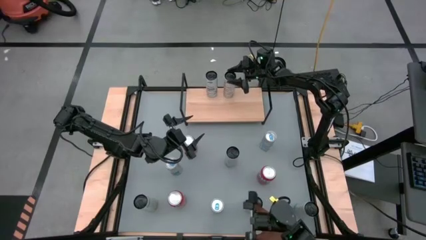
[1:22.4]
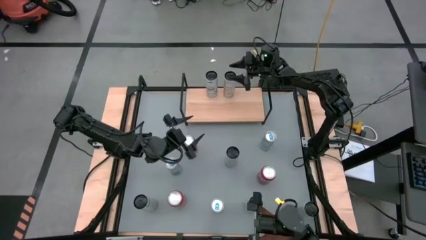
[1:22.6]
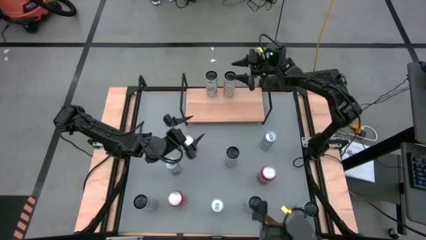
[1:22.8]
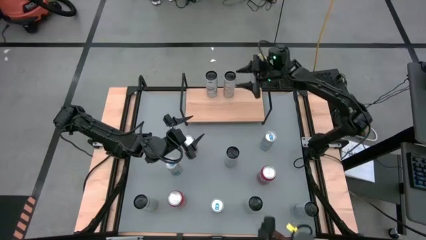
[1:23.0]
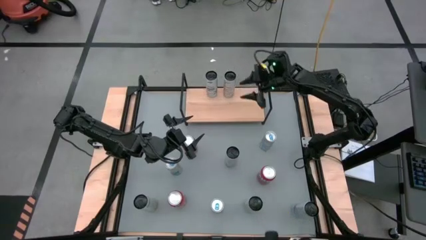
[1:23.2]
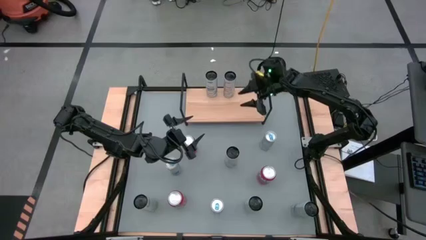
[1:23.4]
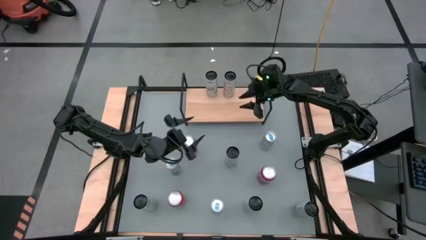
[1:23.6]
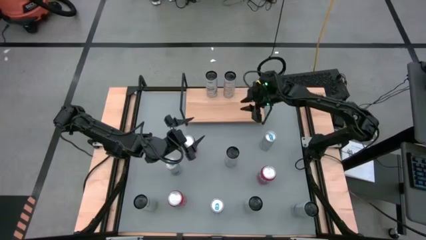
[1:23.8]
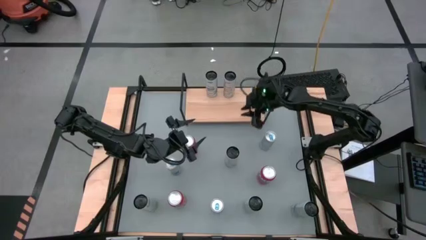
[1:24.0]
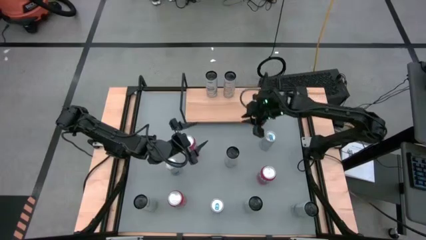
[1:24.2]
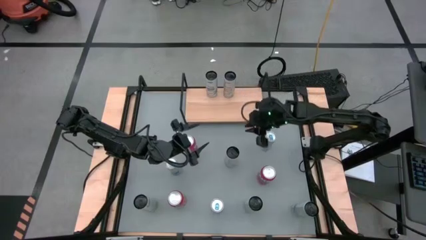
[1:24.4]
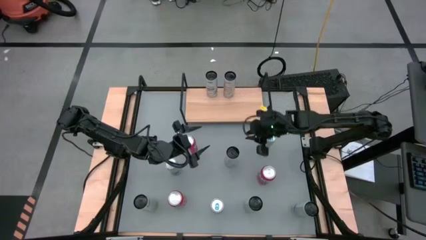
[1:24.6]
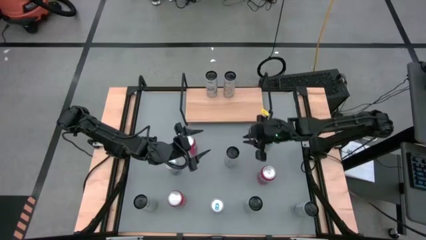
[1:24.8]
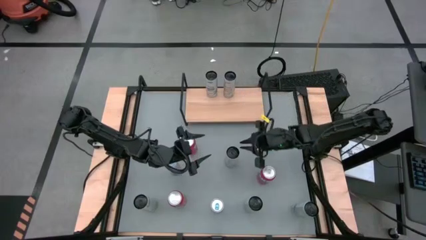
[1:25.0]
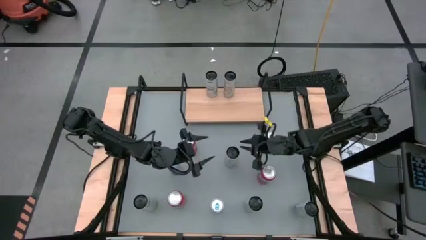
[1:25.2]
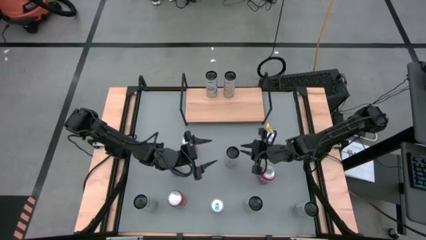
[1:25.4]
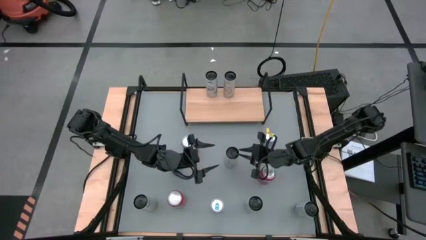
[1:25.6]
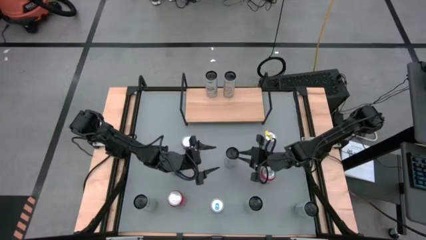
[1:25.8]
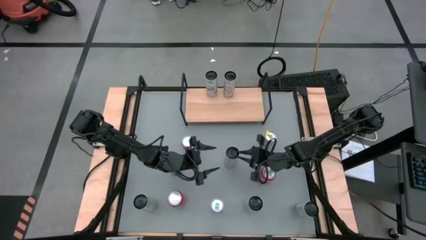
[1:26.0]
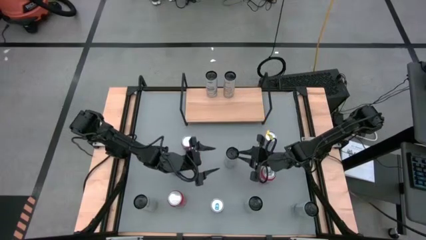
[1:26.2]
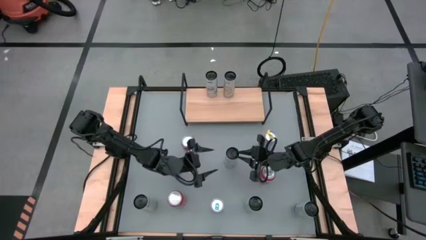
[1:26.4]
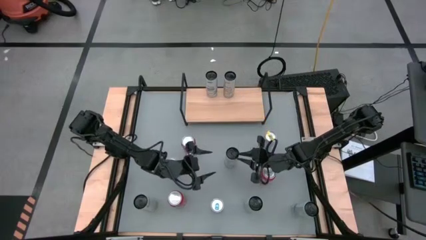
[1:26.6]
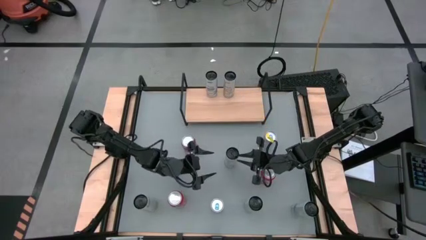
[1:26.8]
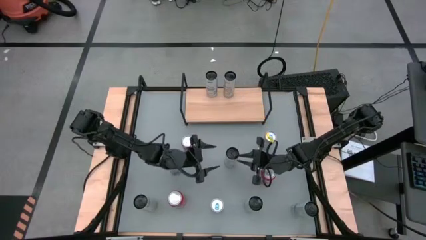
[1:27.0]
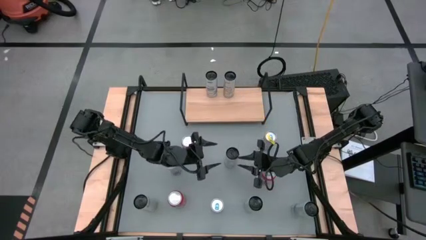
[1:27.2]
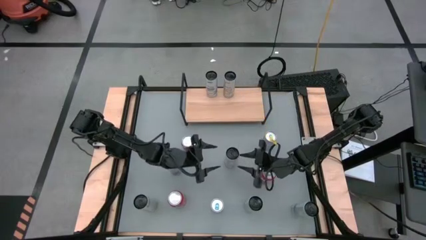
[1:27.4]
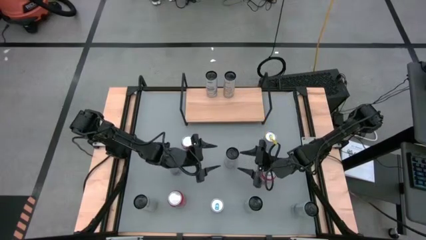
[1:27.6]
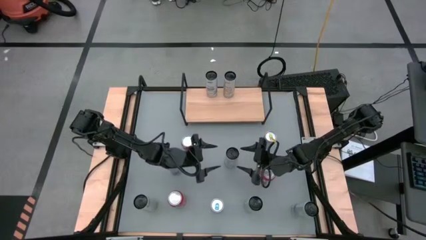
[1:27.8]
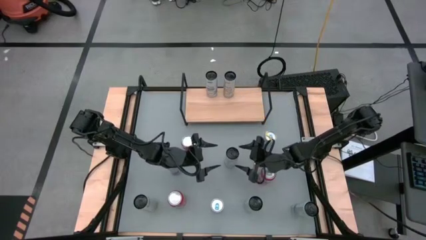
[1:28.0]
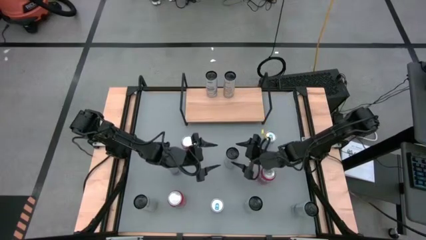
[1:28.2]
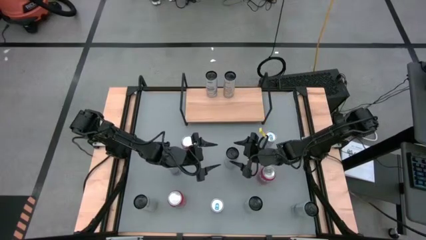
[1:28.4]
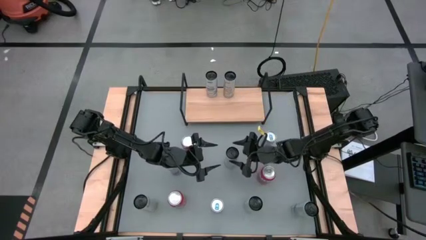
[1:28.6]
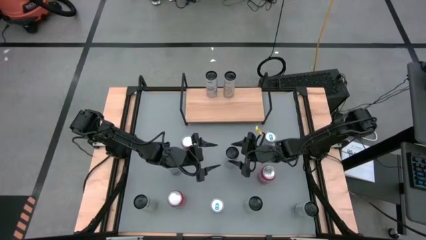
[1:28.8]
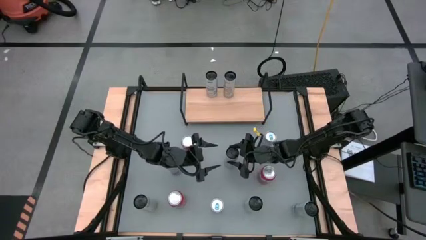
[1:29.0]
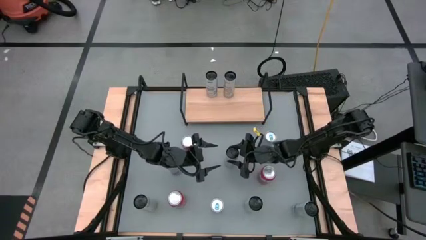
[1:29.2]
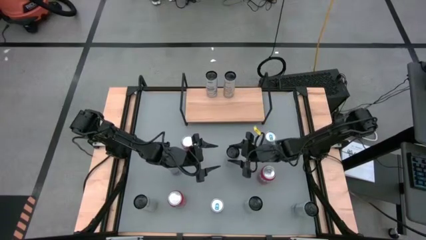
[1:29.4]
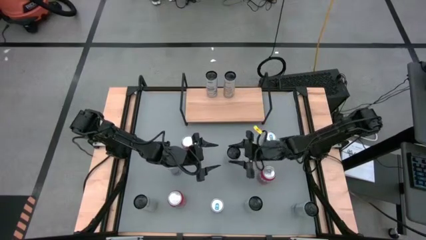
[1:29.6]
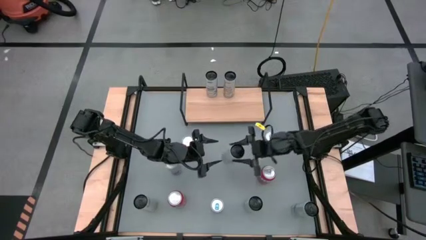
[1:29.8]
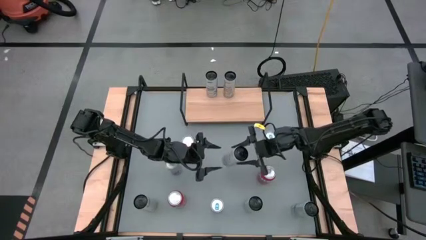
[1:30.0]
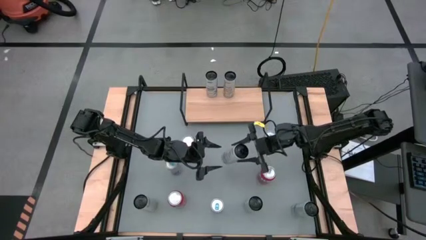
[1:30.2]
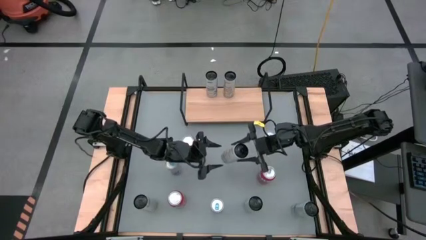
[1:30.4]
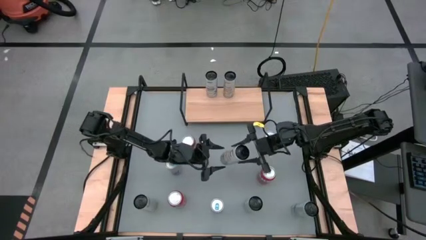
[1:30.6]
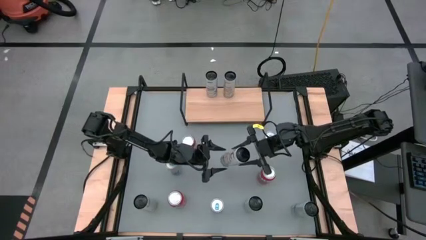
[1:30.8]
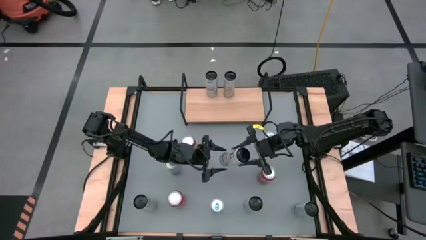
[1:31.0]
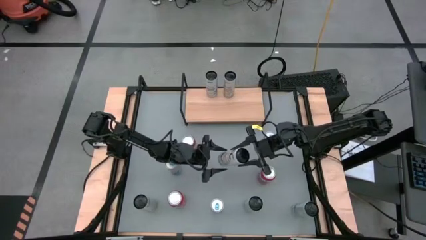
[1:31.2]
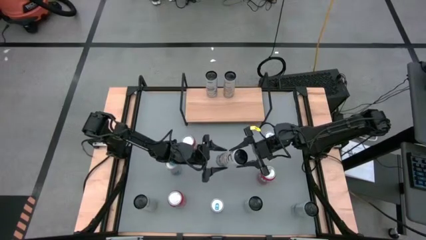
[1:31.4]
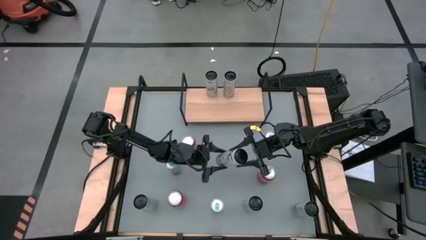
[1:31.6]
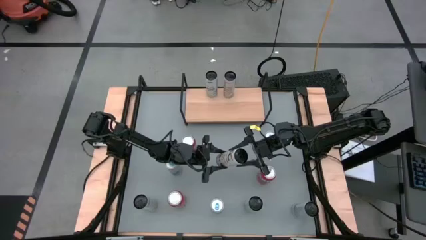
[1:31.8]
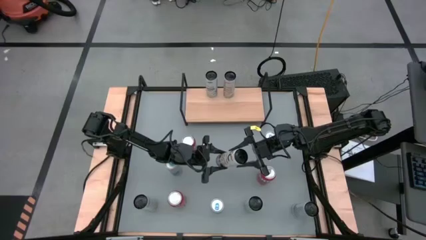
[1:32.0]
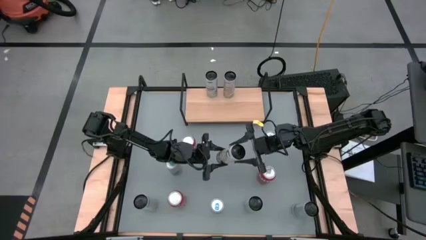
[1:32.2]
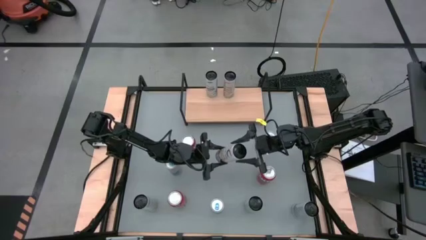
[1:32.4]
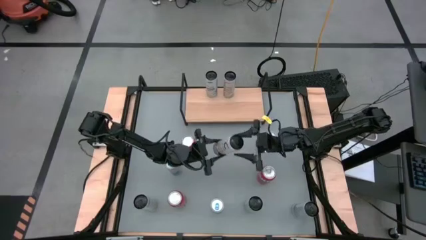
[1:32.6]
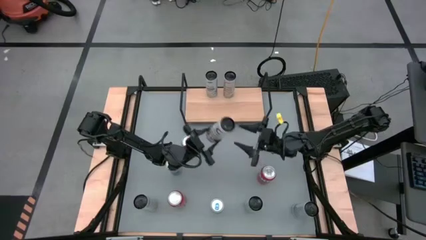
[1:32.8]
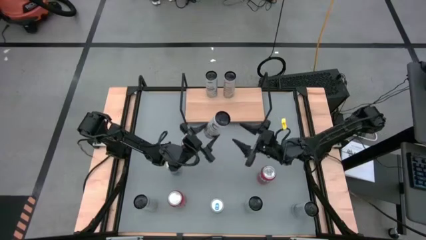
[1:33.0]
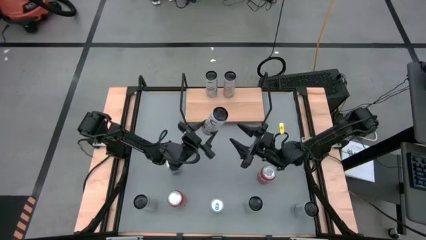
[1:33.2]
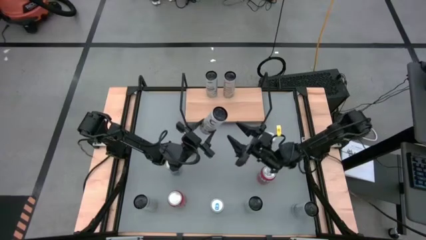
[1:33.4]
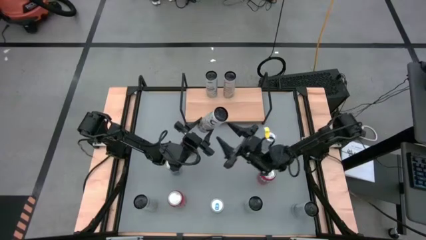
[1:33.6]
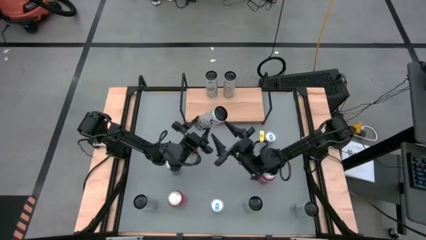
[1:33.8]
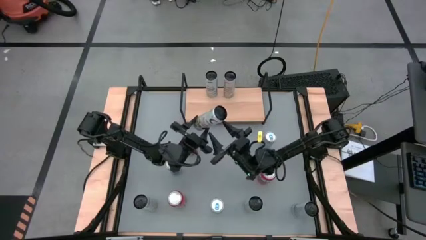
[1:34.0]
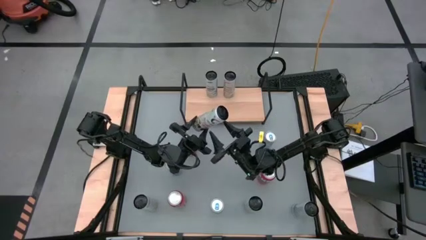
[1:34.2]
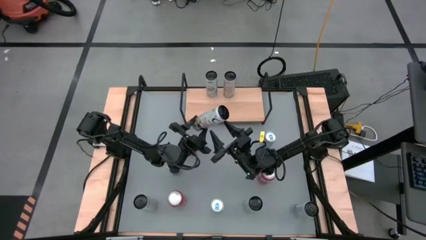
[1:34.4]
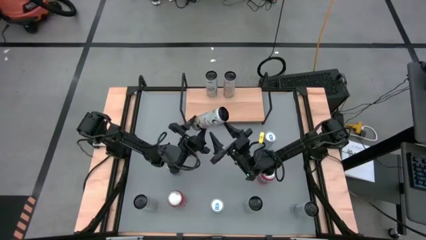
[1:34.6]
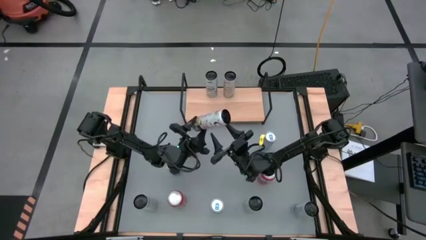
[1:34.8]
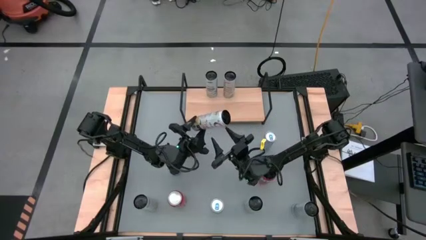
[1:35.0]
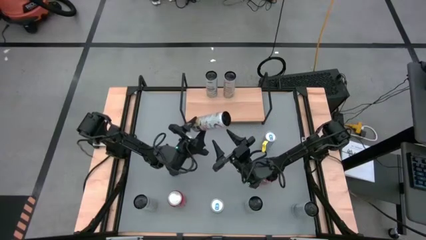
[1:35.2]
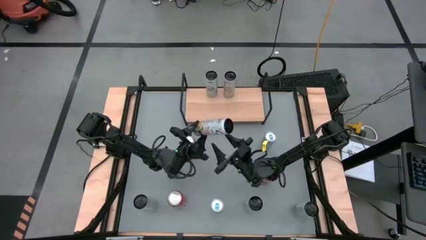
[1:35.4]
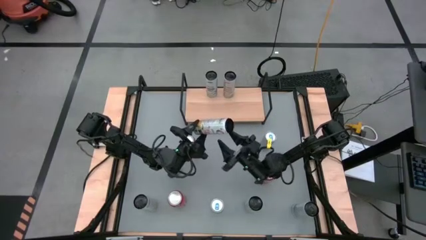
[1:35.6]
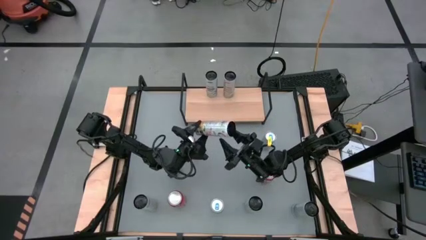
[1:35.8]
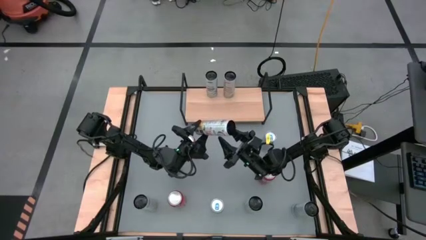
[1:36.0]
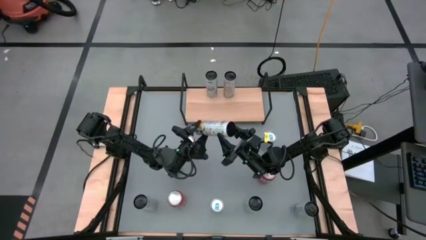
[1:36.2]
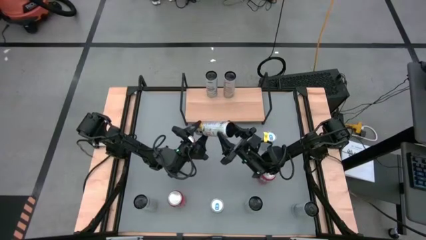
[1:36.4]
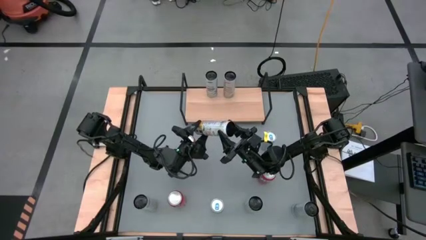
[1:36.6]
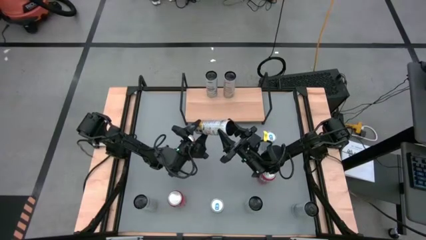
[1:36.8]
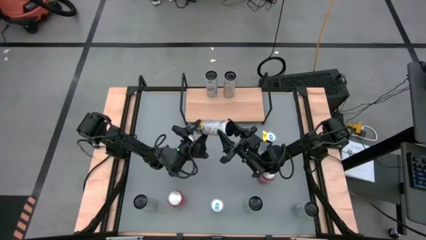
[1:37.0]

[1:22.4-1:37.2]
Task: Place canned beverage on shelf
Put the top white yellow soda can aligned with the other white yellow soda can on the shelf
